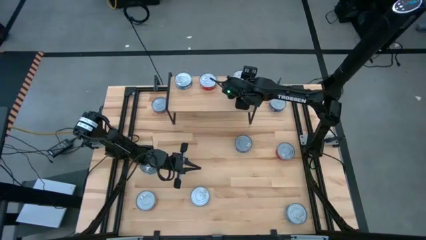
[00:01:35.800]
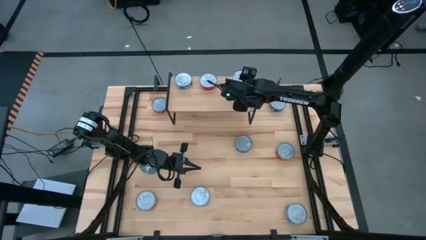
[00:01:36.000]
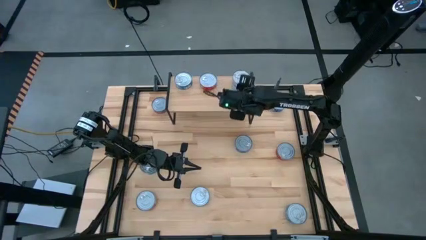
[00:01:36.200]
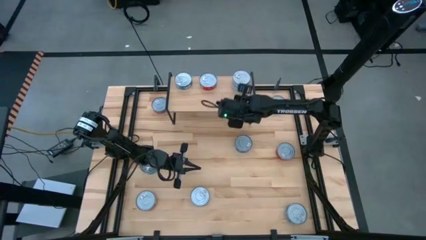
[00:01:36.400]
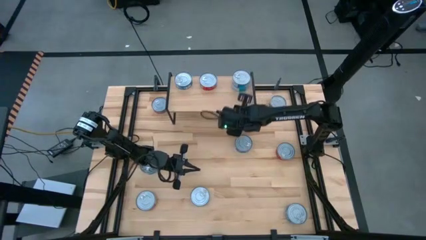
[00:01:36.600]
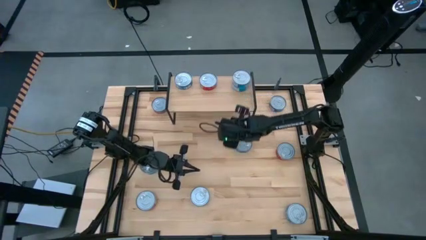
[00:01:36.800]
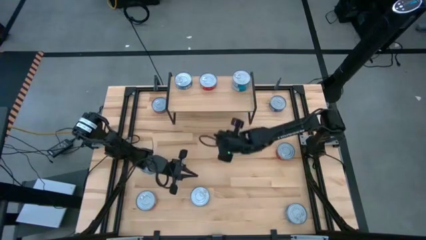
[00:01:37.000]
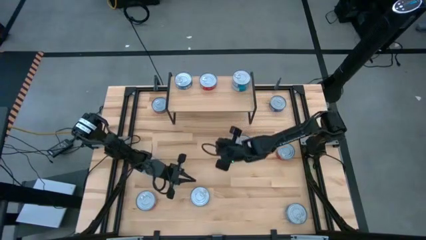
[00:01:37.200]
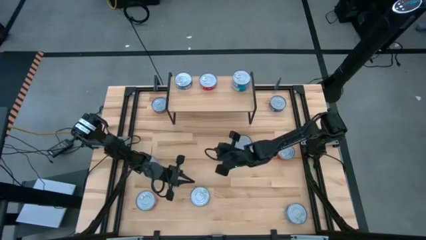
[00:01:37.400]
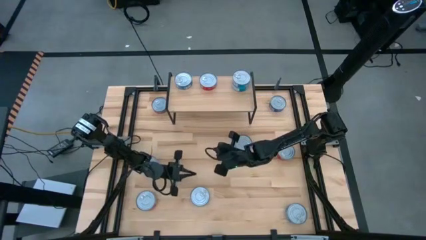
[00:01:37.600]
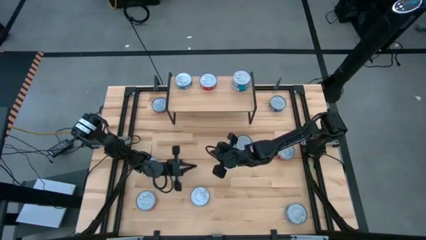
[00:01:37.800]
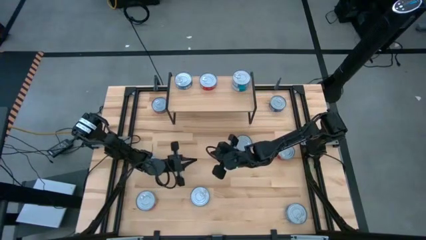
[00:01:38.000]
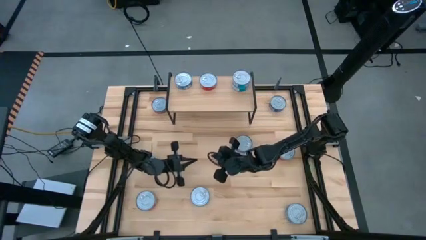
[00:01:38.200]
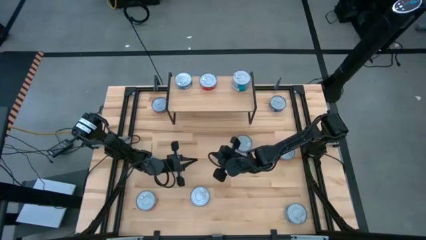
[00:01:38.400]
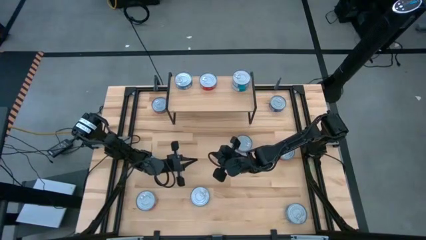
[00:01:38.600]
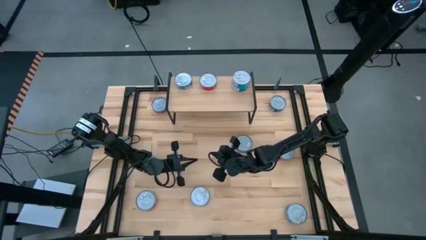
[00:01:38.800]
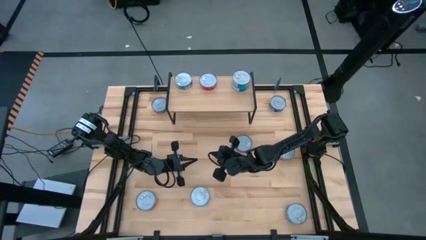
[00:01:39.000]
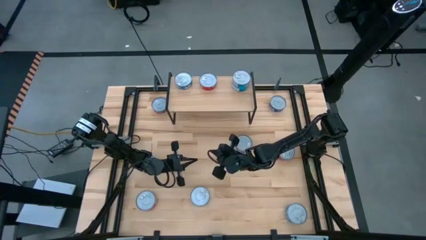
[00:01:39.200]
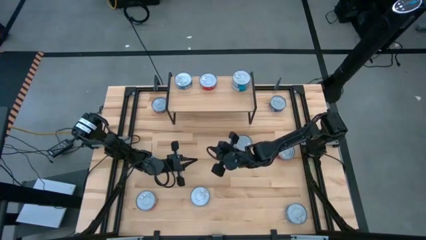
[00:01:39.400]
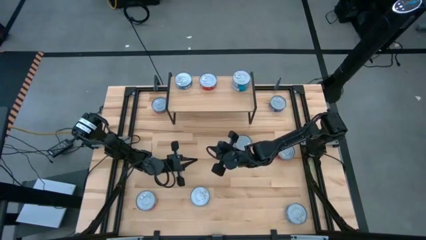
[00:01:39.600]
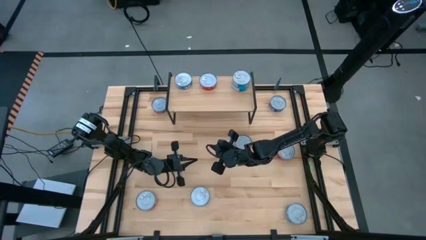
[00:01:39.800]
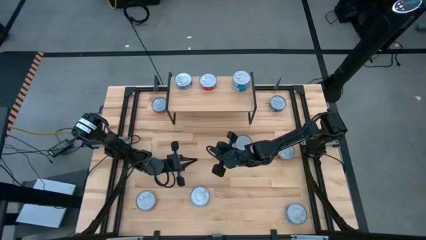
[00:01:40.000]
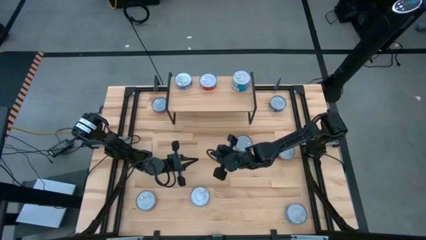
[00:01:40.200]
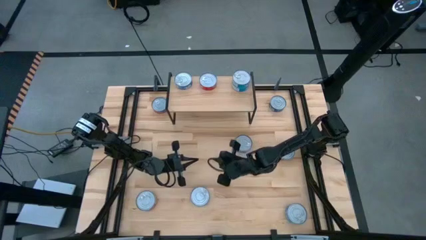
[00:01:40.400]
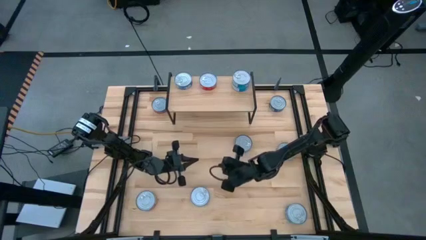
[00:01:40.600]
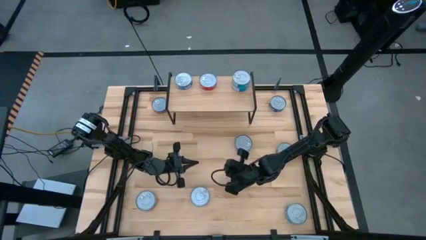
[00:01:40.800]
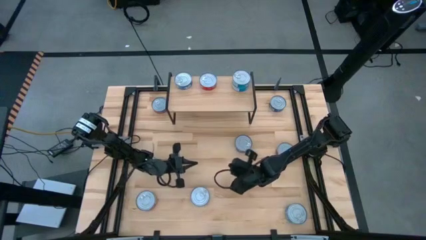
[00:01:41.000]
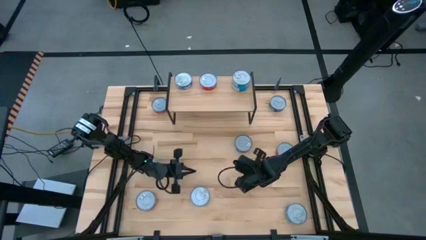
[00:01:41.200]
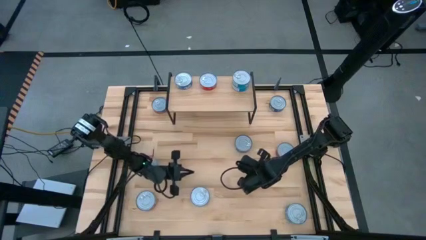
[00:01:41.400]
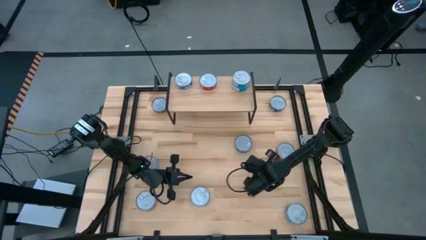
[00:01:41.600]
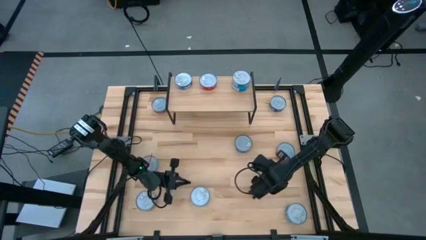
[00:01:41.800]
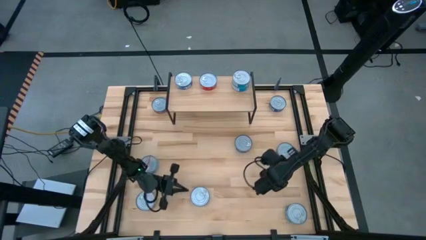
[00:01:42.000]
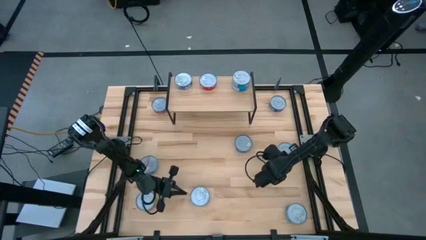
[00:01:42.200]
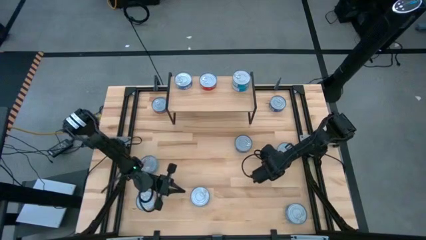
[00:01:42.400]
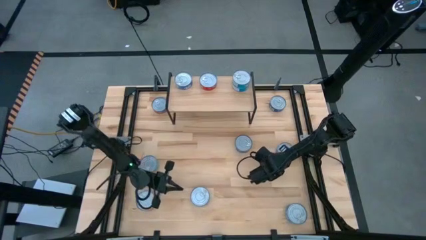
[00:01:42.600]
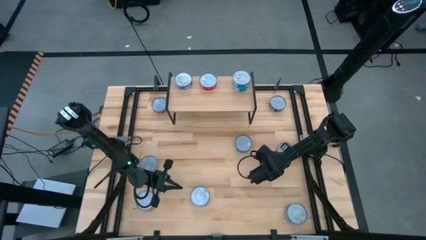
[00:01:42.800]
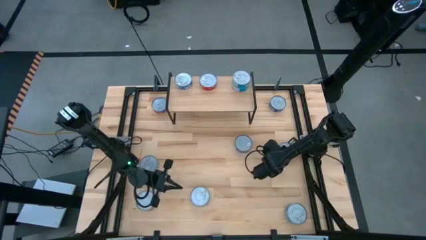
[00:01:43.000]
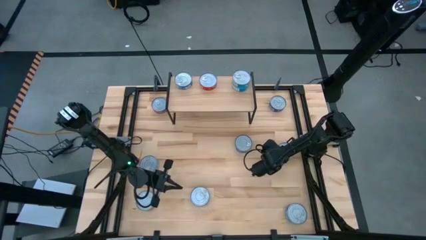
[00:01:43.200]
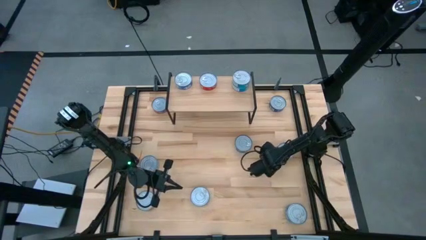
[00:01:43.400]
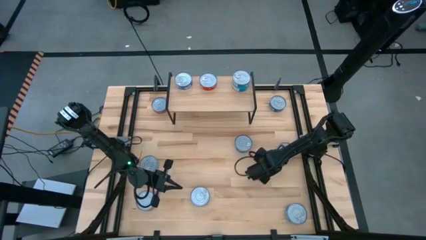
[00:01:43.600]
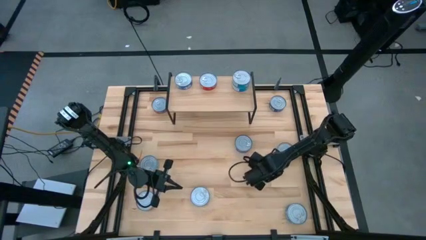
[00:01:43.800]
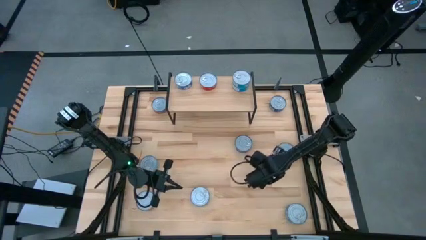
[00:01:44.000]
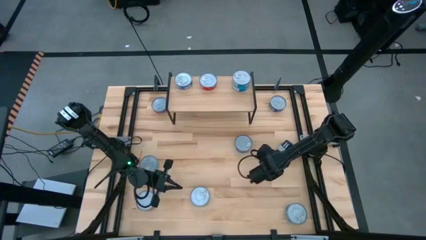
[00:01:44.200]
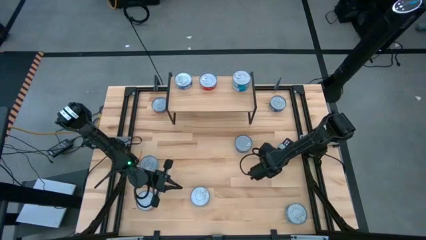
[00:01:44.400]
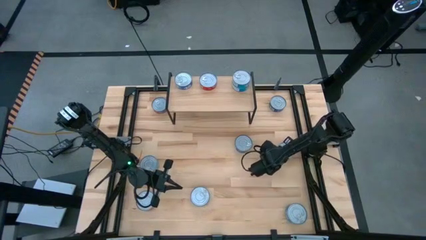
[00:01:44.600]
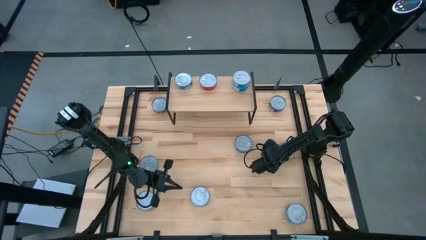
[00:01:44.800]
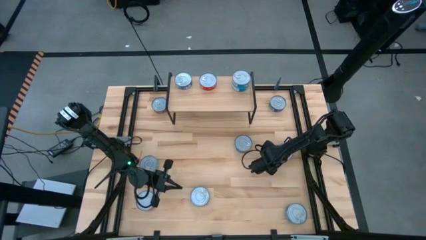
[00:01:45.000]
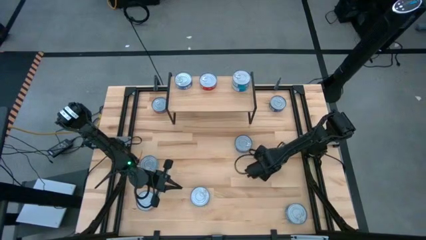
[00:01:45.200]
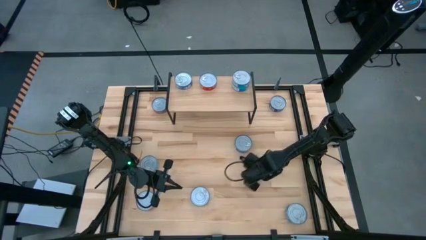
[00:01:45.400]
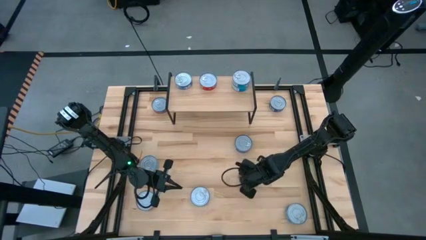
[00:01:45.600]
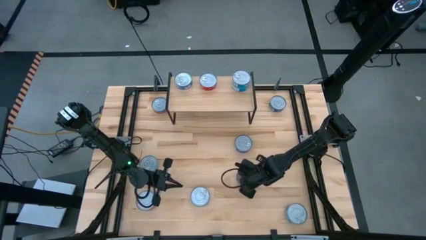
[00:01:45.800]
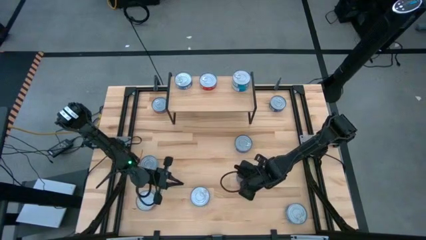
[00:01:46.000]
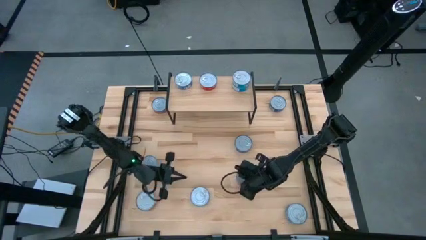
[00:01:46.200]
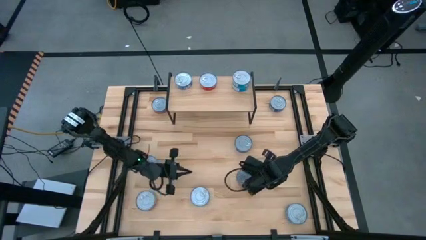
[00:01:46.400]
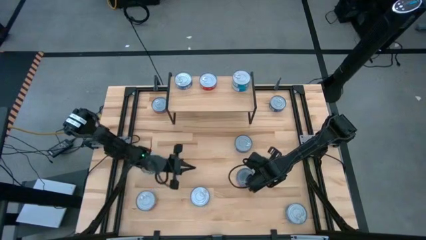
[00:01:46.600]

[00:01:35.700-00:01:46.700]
Task: Stack canned seafood by type on shelf
Stack the red tuna can on top of the red tuna can on the shelf
